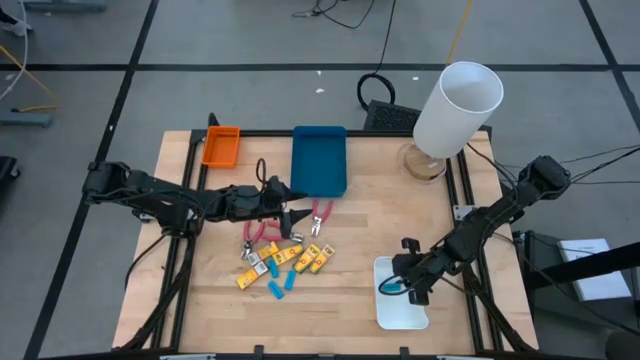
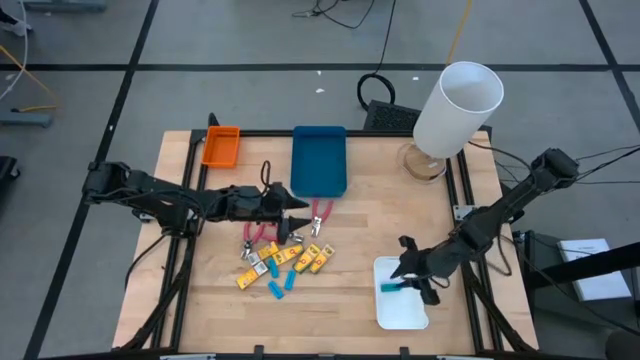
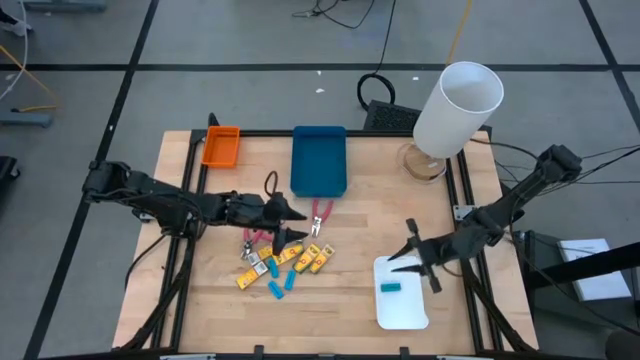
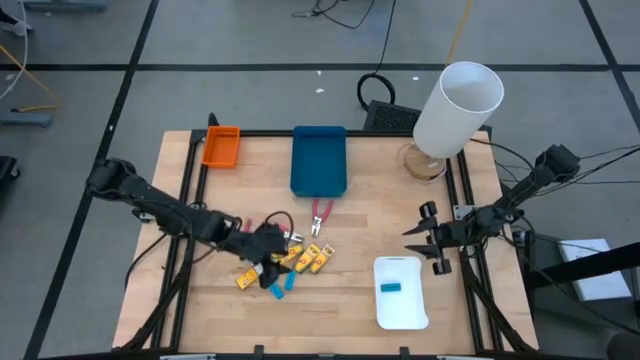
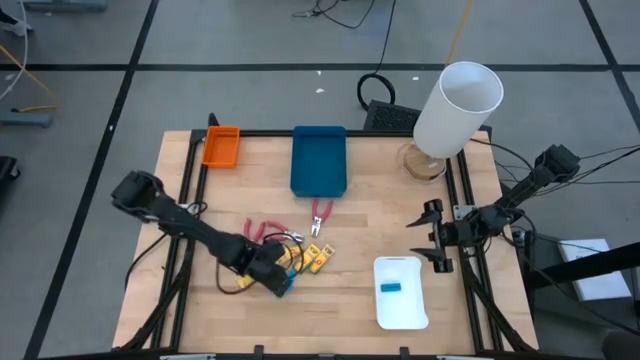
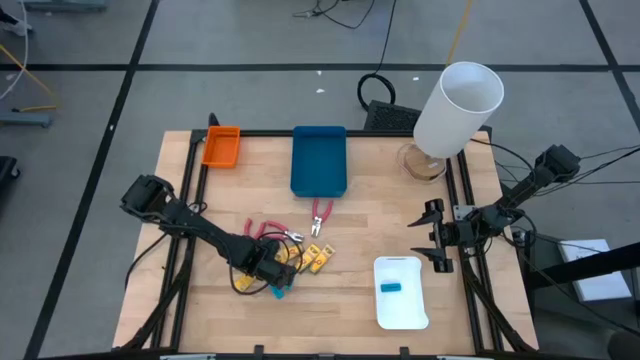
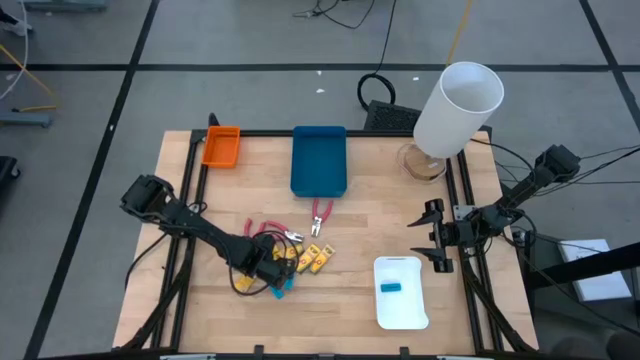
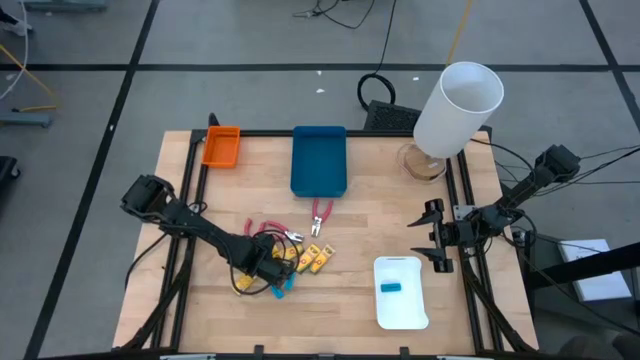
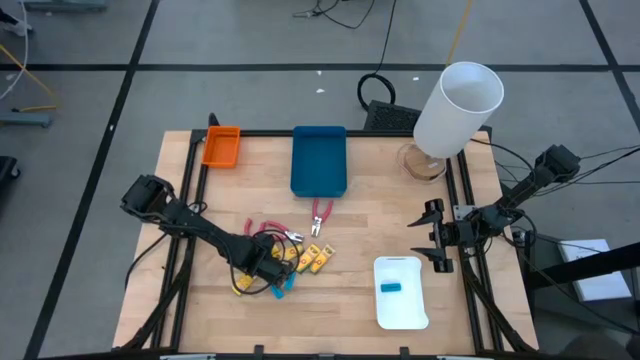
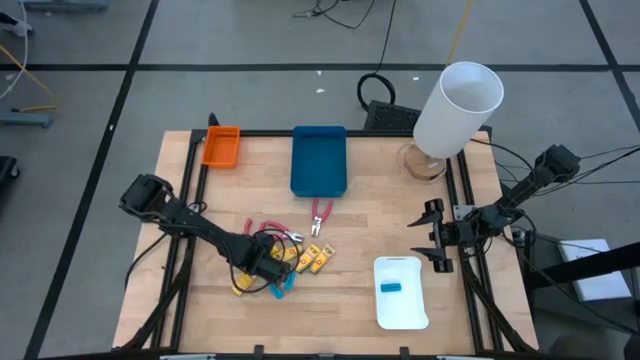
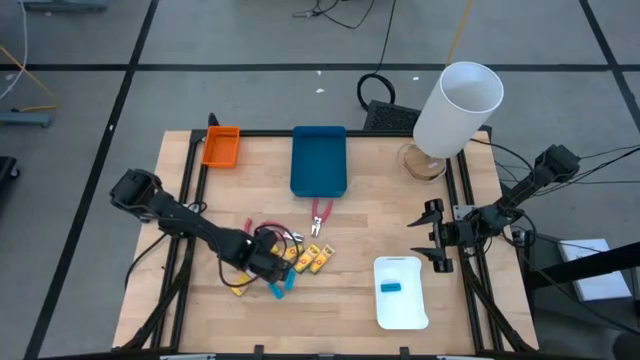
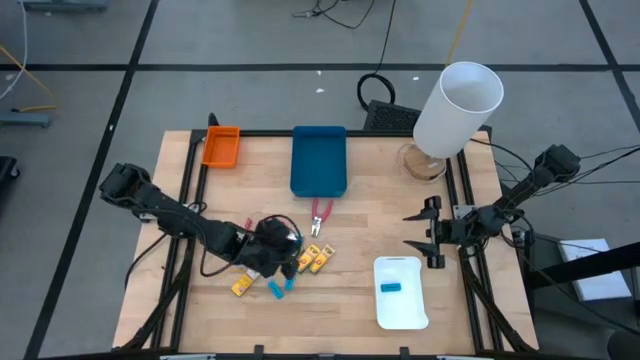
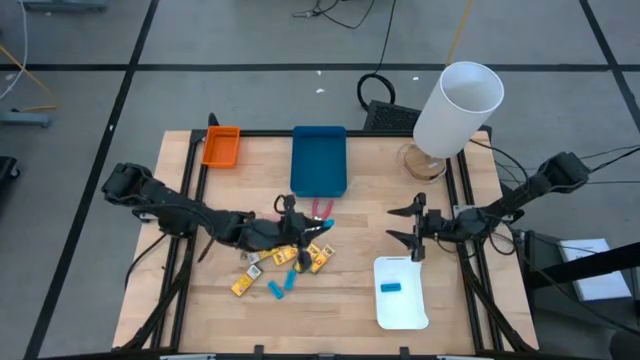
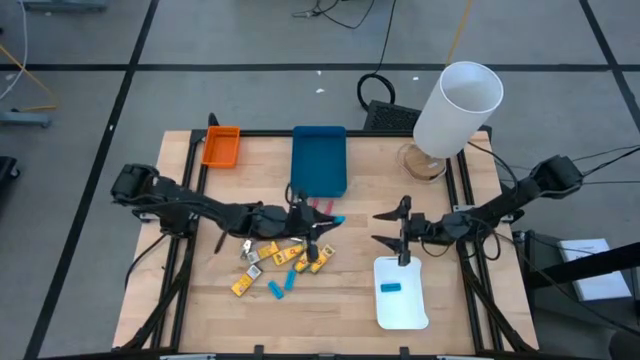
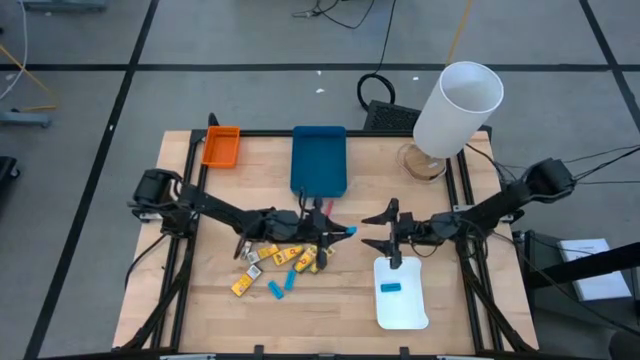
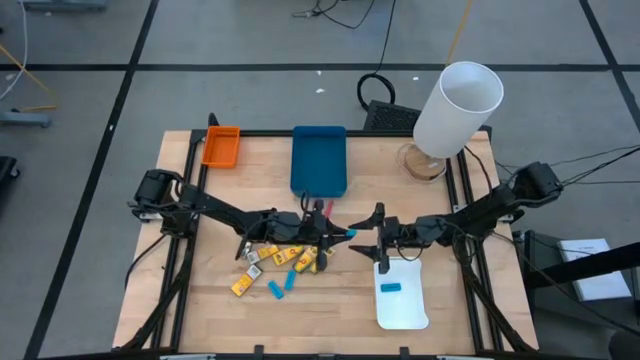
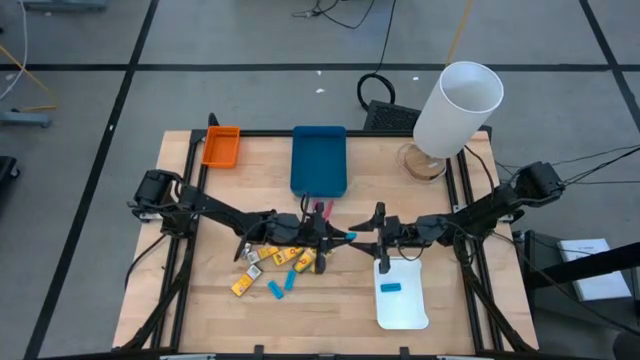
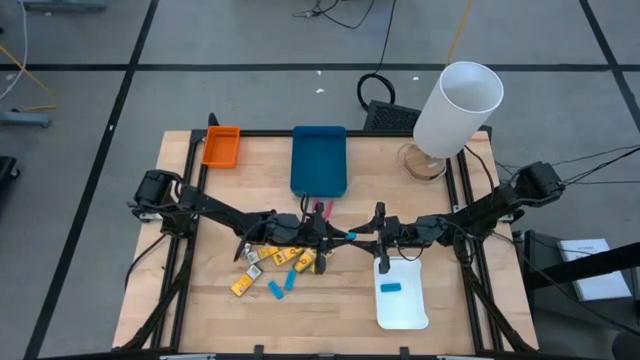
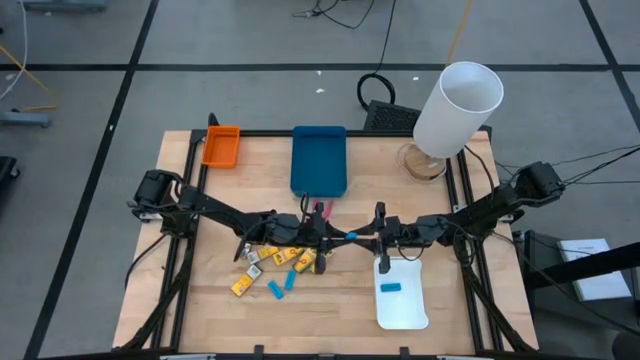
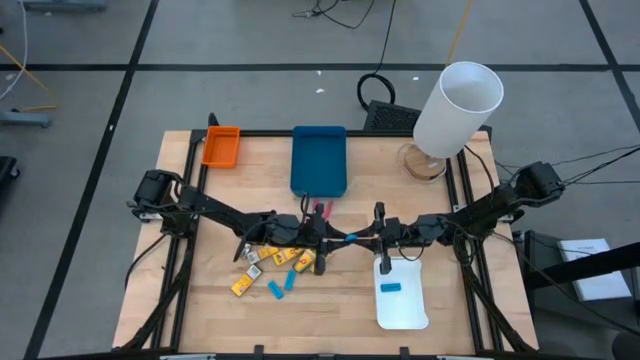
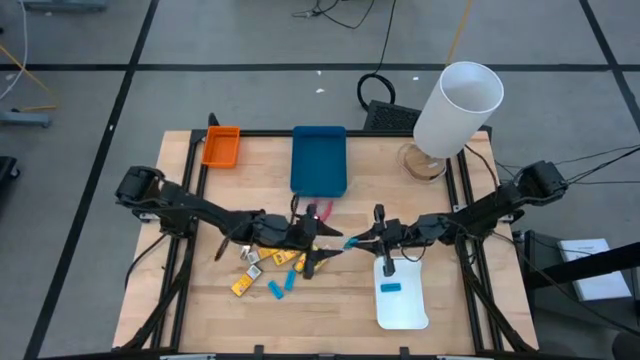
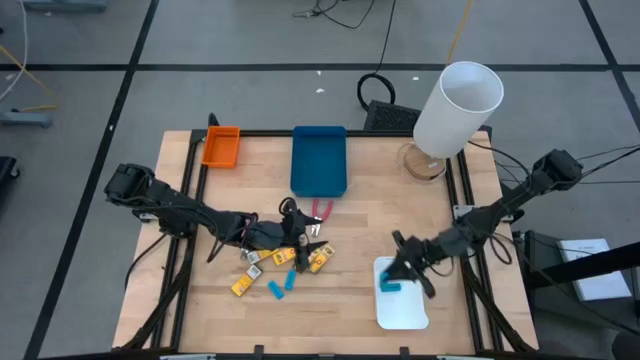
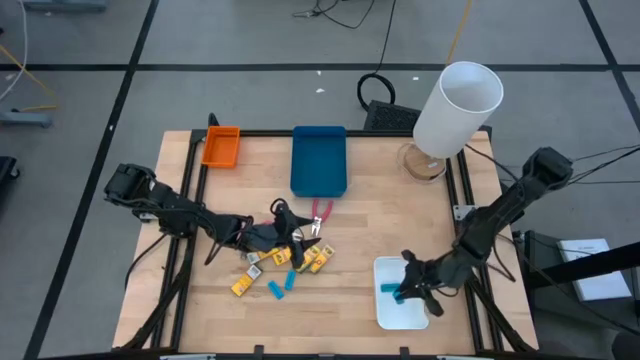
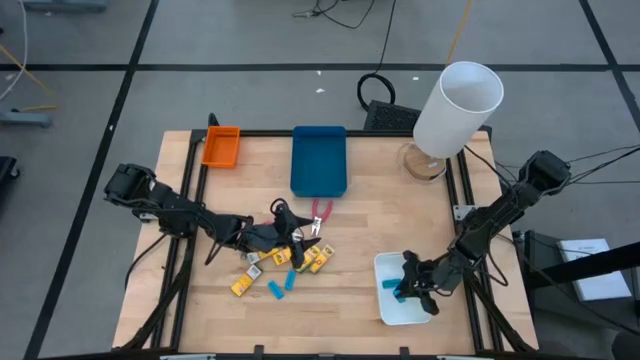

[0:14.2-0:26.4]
Task: Pick & Place School Supplies
Put the blue eraser into the white bin

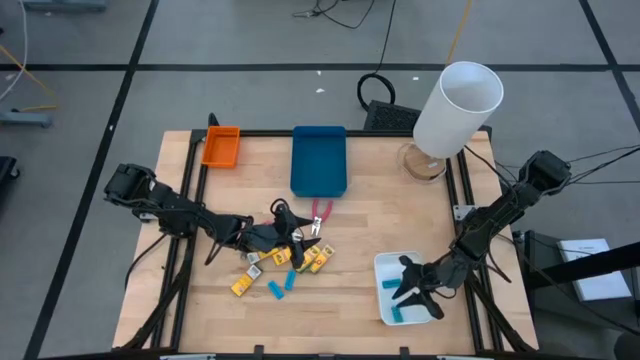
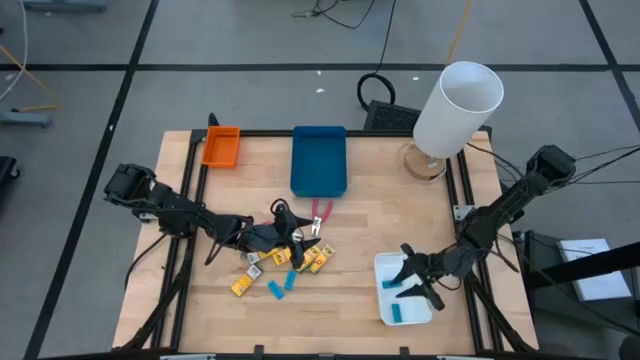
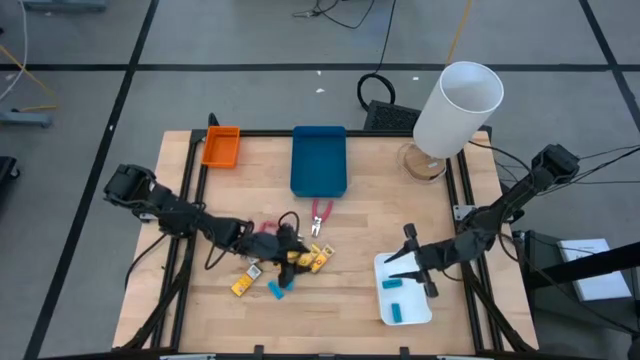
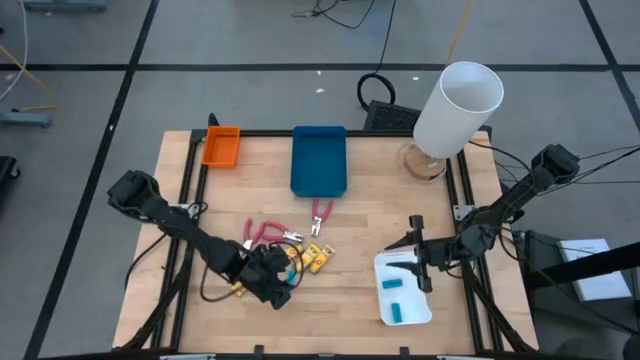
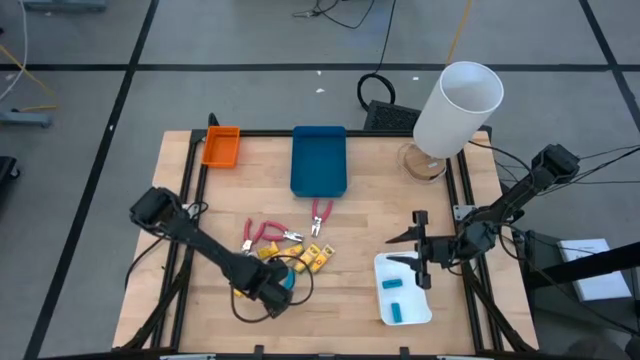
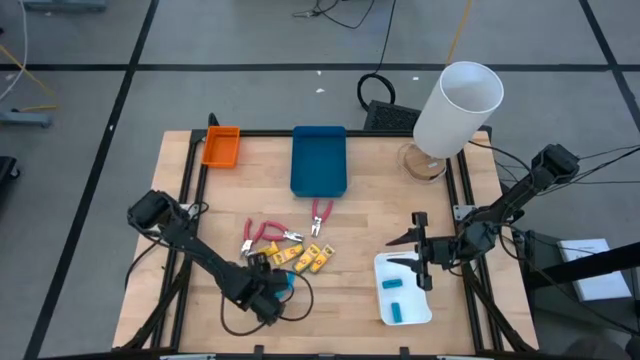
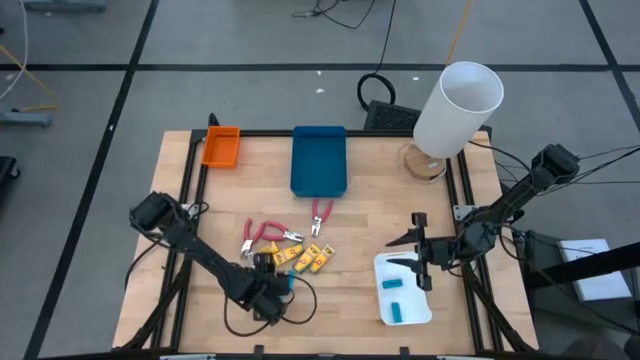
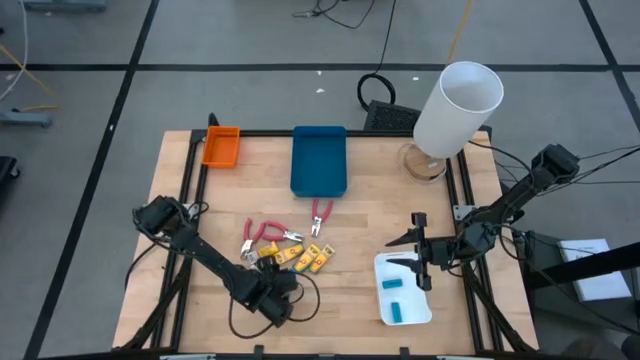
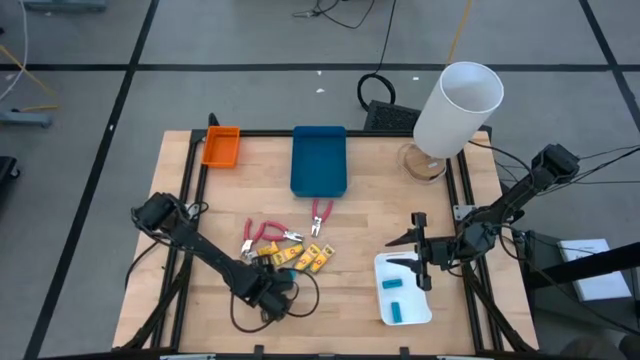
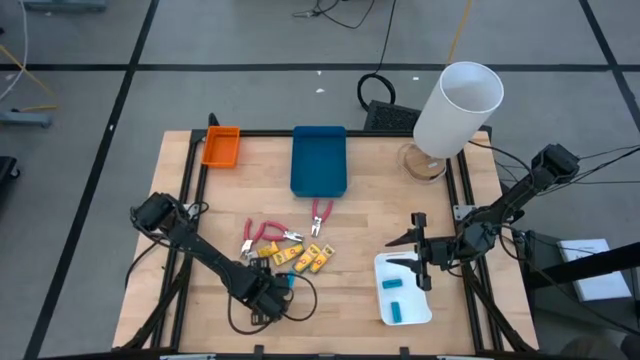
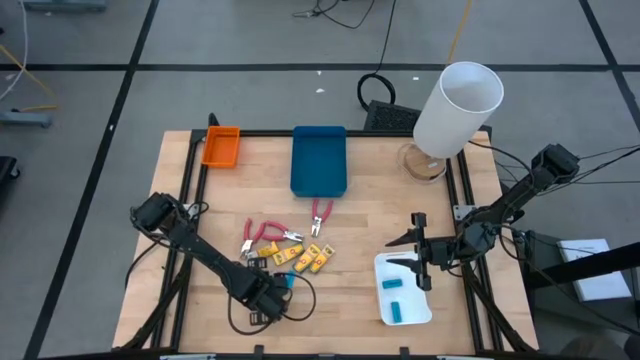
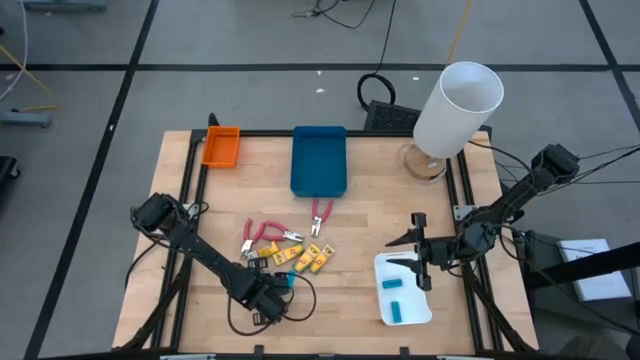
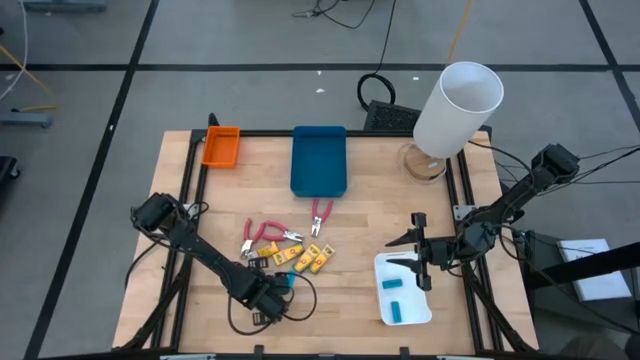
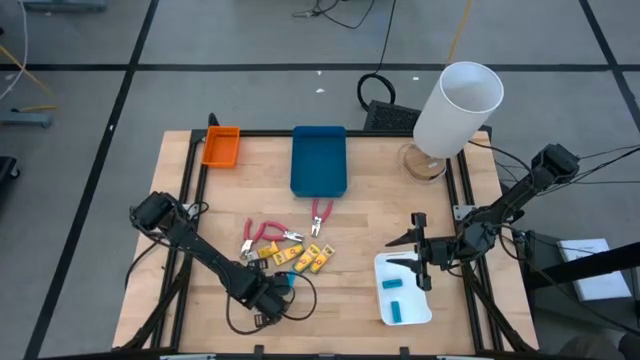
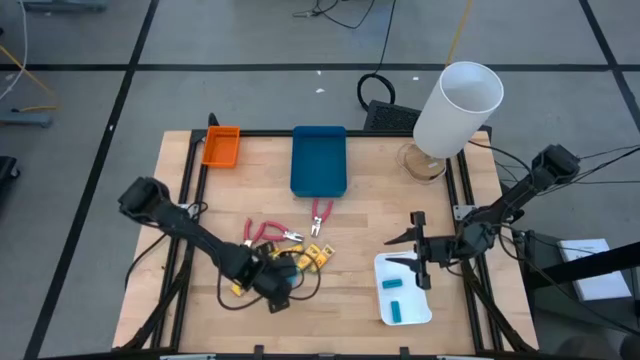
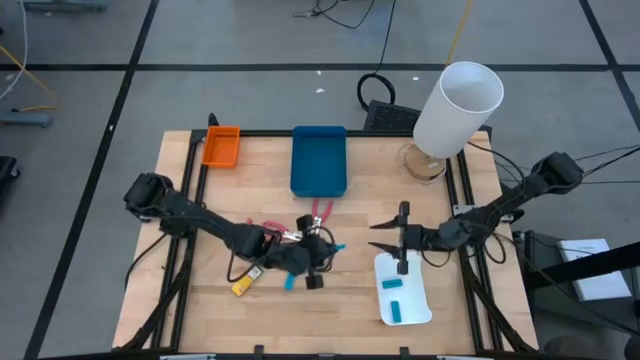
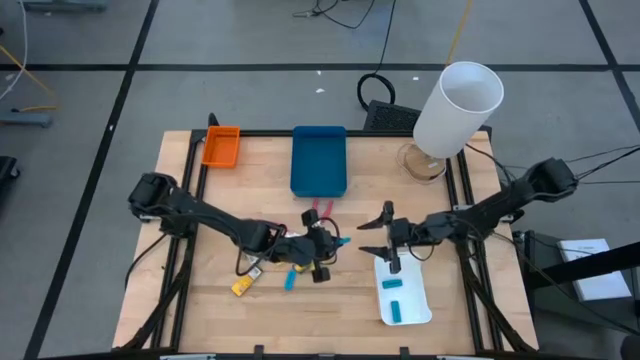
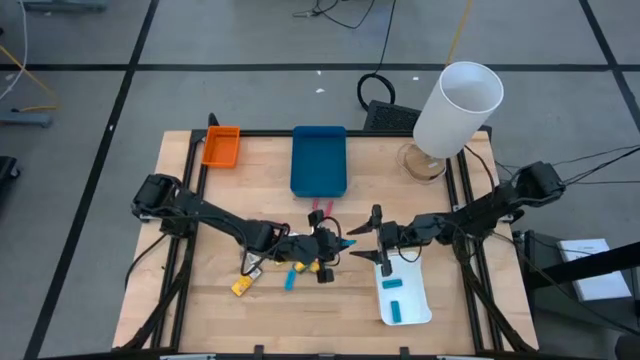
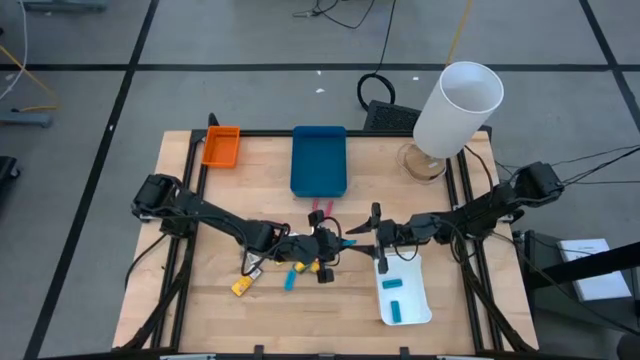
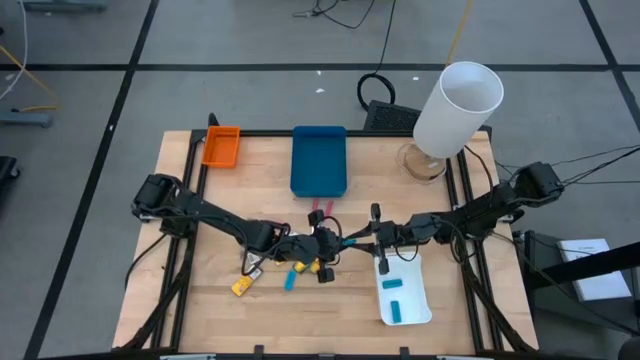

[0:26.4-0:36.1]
Put the blue eraser into the white bin
